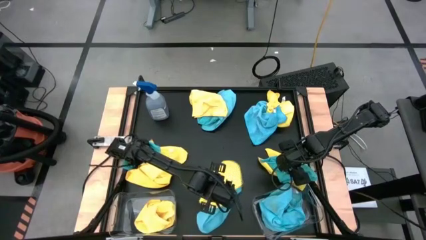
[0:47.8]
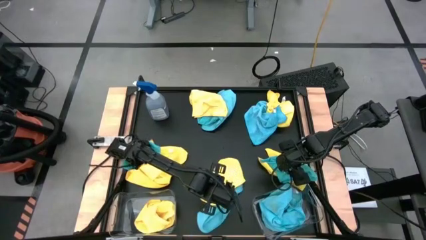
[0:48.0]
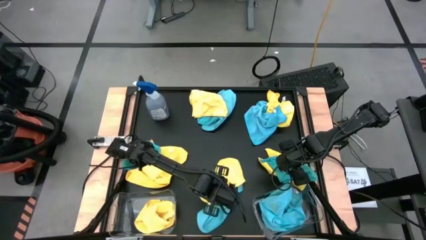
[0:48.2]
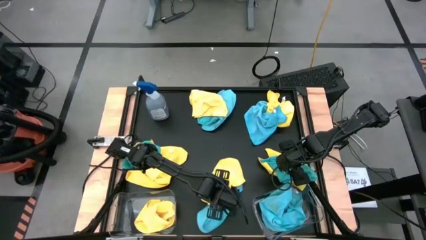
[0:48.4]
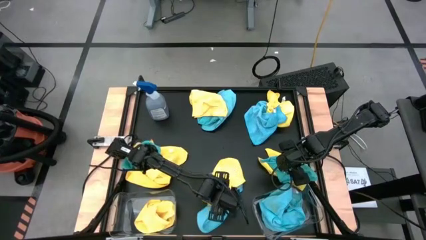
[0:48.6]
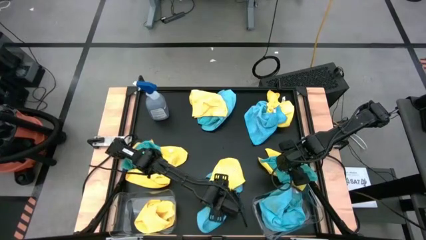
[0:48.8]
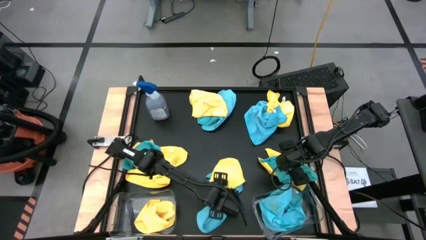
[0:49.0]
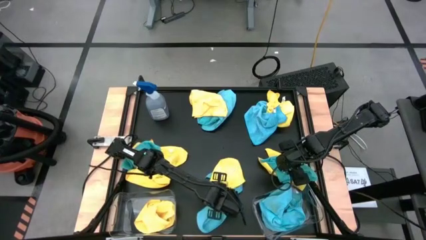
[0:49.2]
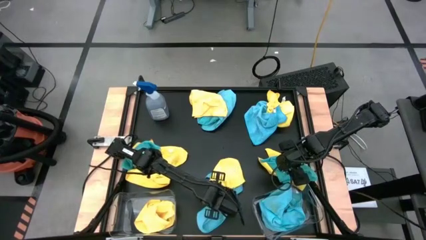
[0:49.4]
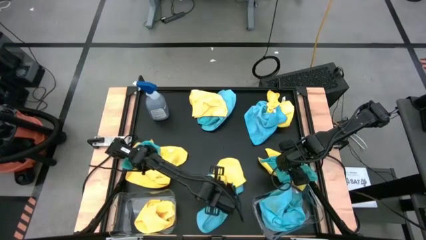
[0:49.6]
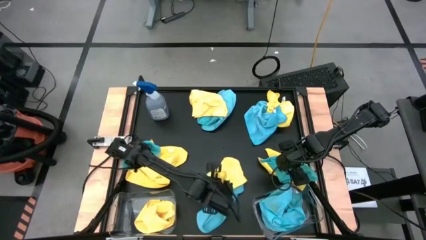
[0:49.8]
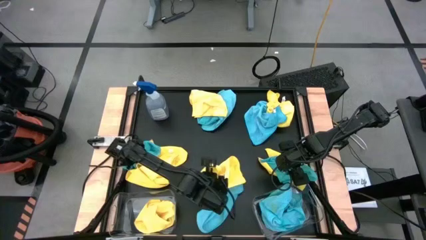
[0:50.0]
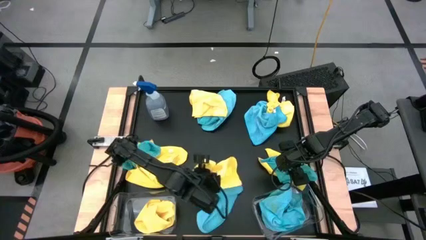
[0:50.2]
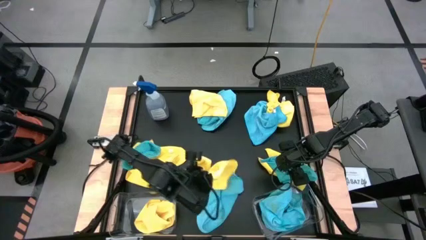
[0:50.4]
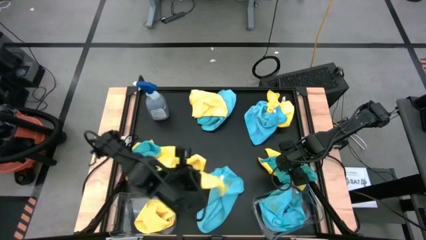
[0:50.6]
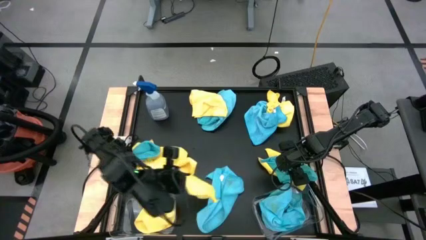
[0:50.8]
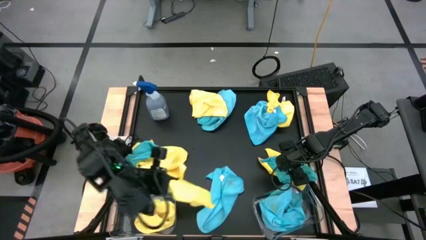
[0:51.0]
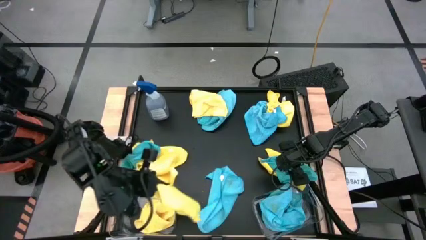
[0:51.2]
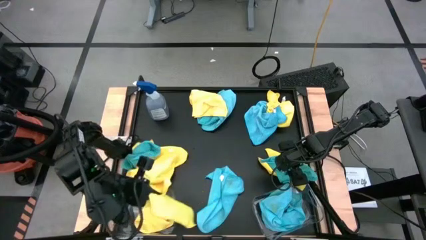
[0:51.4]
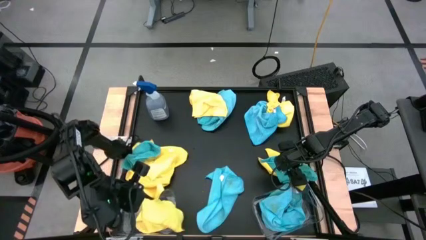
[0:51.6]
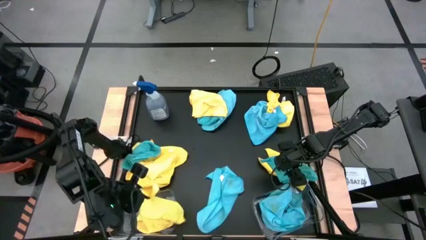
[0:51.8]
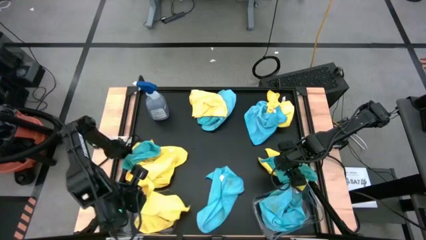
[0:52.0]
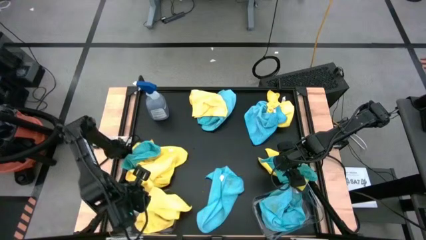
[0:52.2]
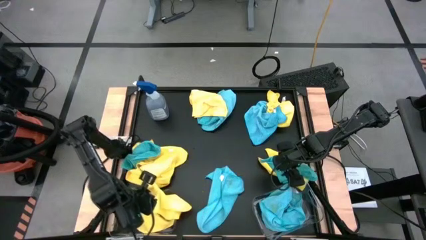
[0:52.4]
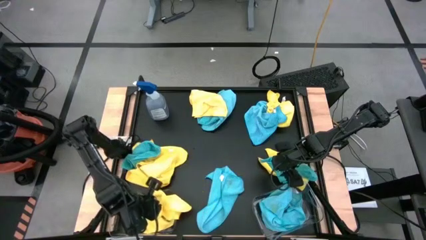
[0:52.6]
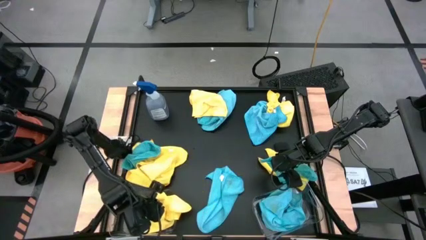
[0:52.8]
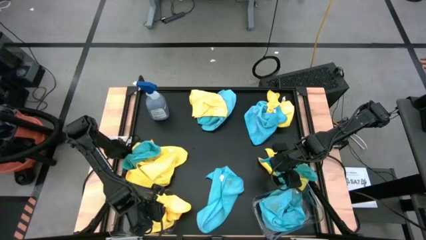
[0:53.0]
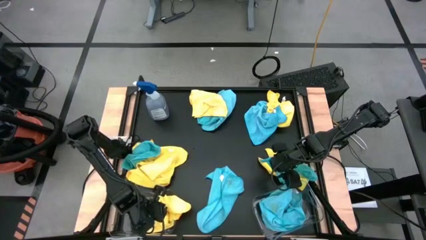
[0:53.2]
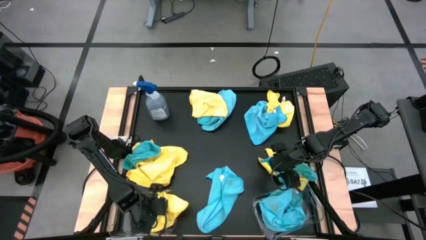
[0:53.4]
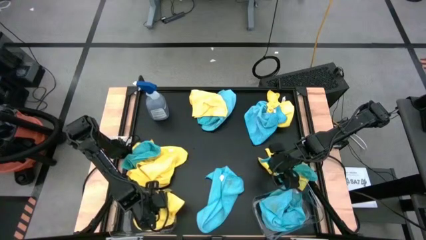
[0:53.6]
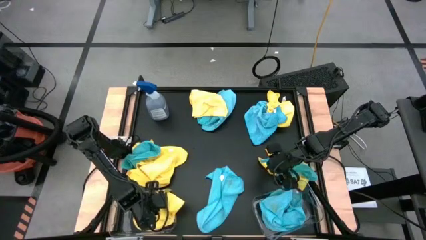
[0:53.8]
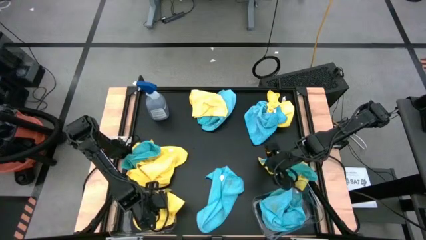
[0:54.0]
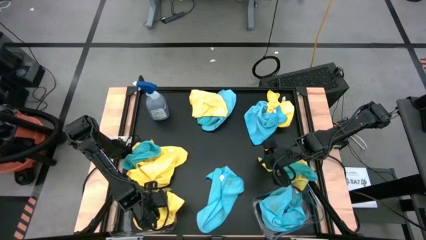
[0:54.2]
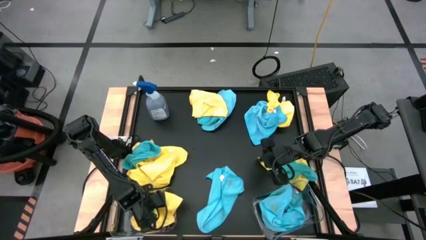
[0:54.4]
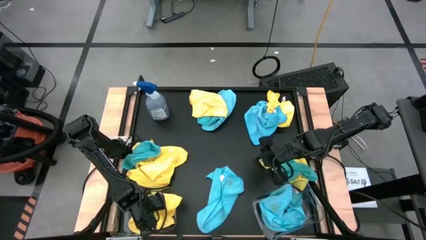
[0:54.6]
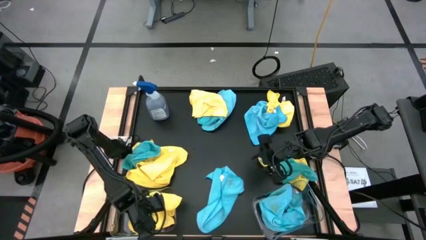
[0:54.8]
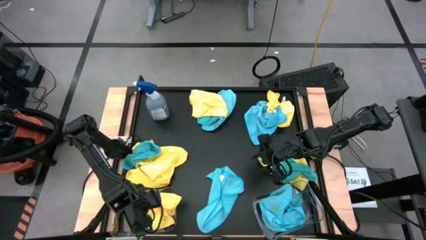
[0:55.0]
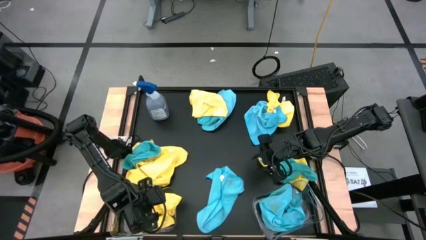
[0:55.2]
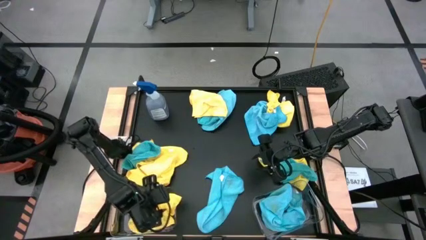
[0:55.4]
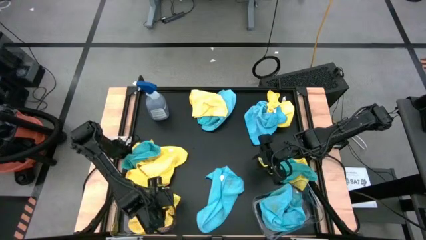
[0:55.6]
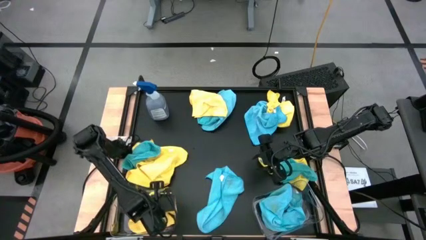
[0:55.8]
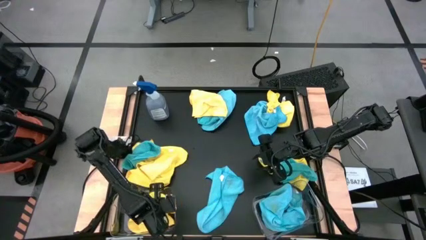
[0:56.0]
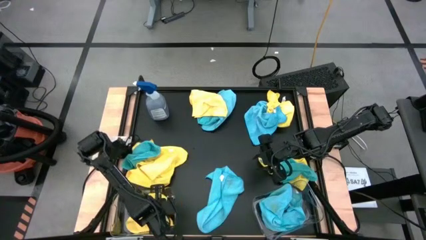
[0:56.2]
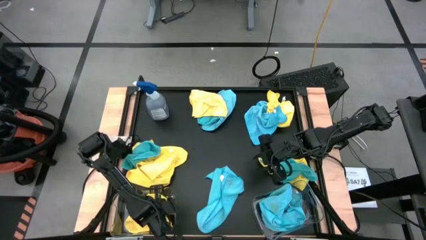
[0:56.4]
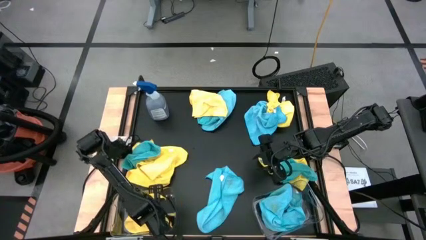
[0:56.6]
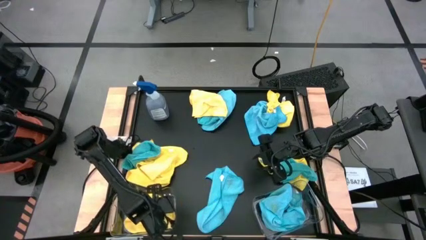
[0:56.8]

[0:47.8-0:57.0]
Task: Sort microfiber towel by color & place in baskets
Put the yellow towel into the left transparent bin
